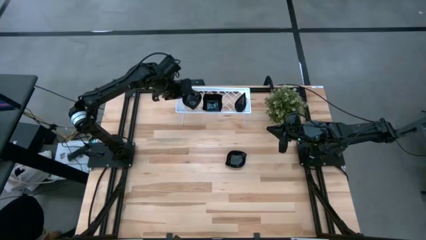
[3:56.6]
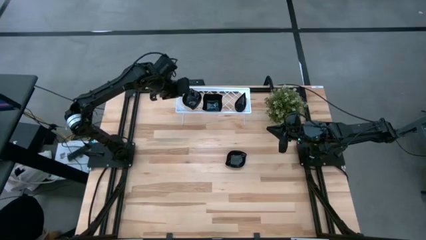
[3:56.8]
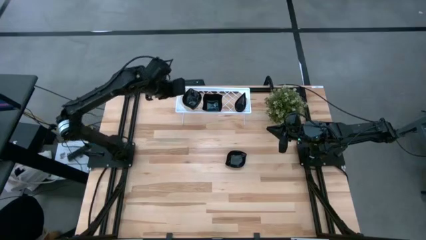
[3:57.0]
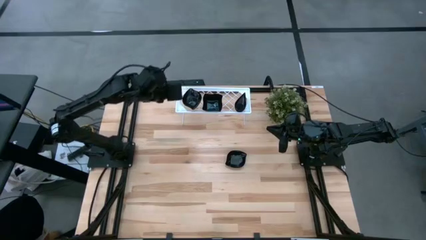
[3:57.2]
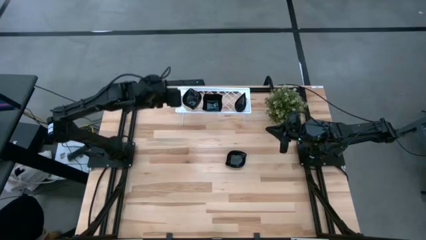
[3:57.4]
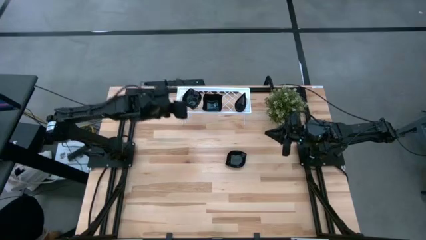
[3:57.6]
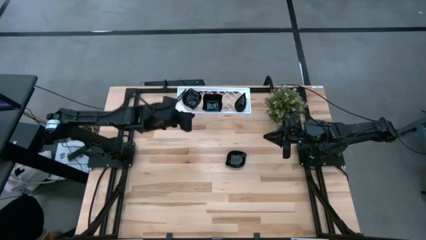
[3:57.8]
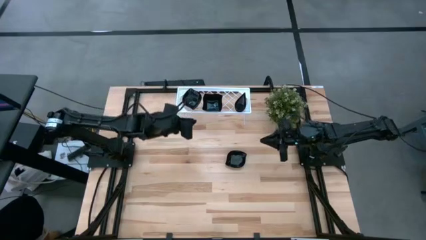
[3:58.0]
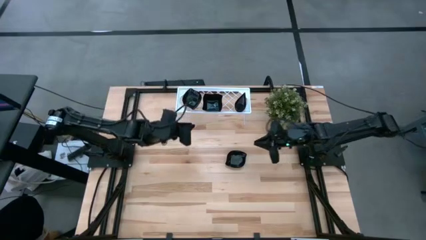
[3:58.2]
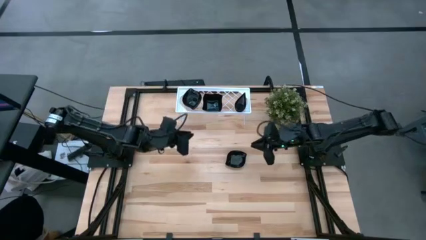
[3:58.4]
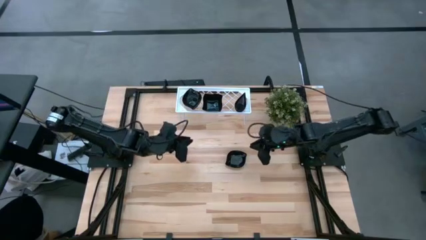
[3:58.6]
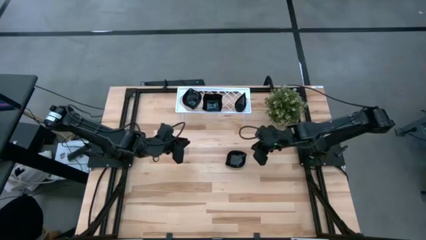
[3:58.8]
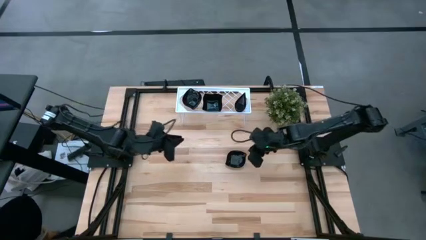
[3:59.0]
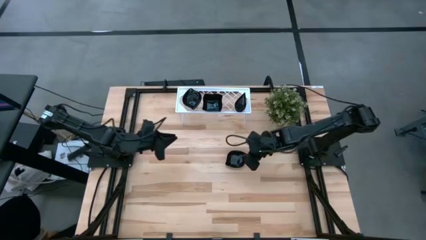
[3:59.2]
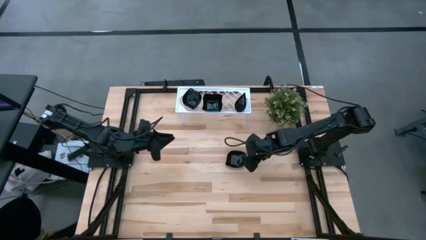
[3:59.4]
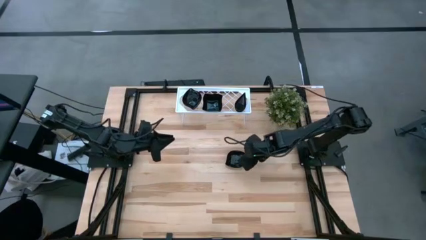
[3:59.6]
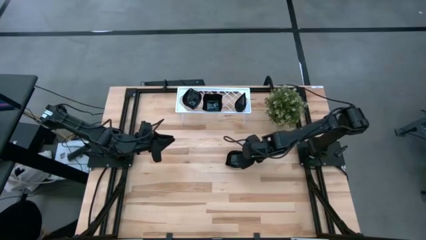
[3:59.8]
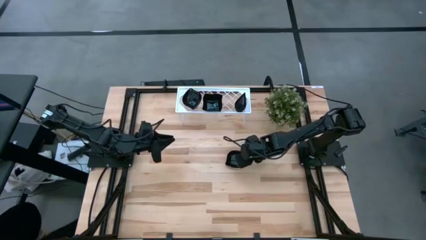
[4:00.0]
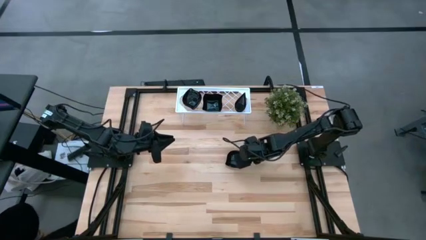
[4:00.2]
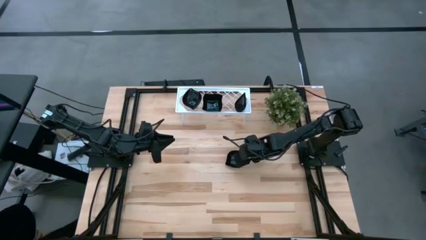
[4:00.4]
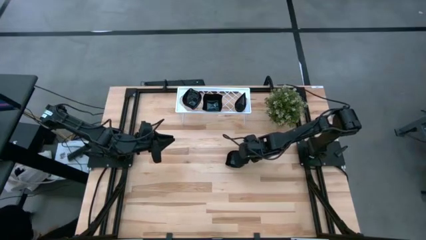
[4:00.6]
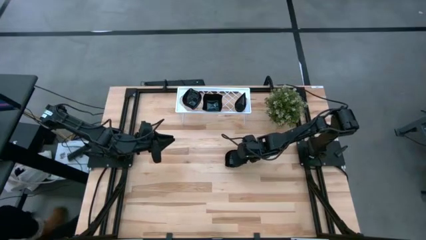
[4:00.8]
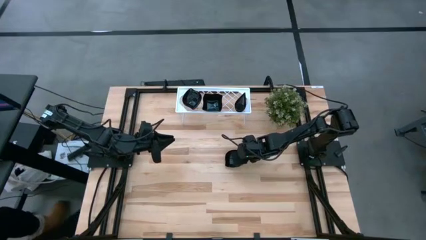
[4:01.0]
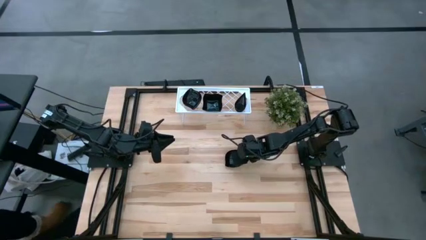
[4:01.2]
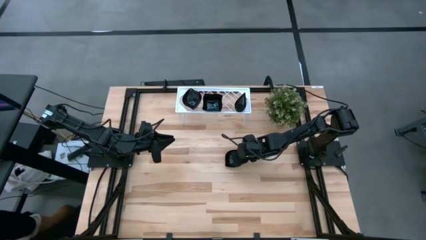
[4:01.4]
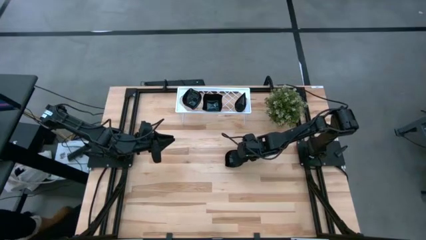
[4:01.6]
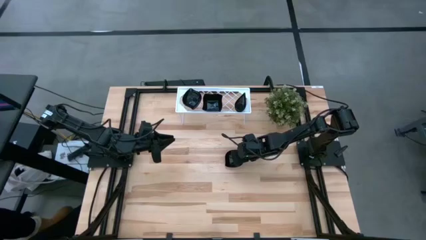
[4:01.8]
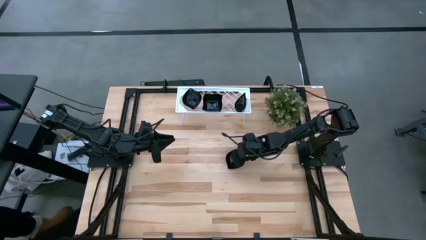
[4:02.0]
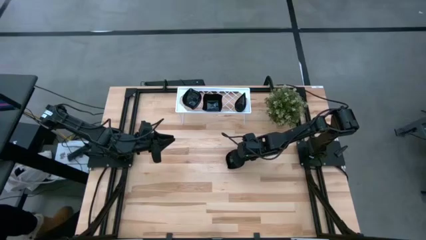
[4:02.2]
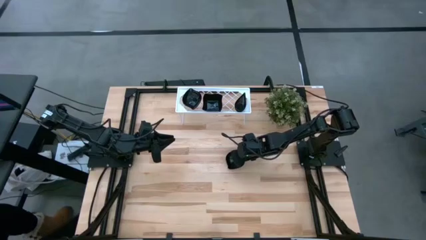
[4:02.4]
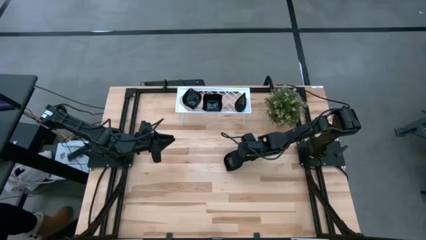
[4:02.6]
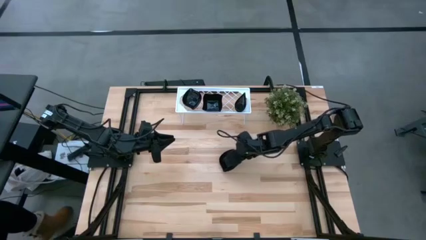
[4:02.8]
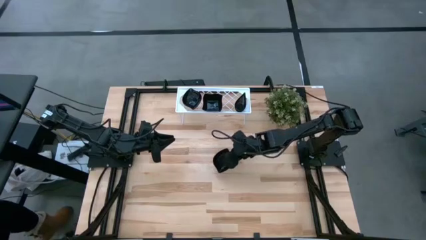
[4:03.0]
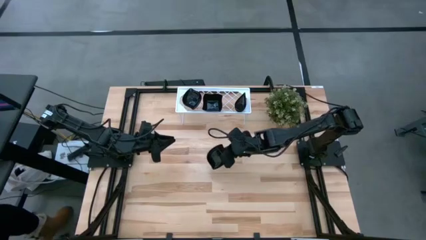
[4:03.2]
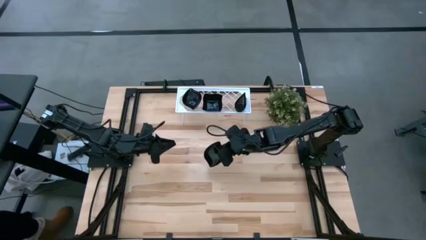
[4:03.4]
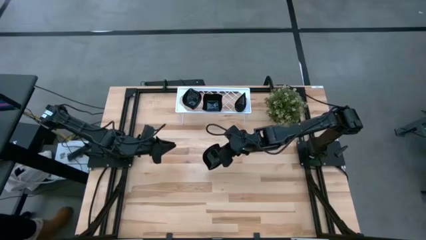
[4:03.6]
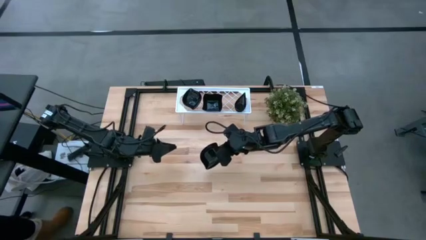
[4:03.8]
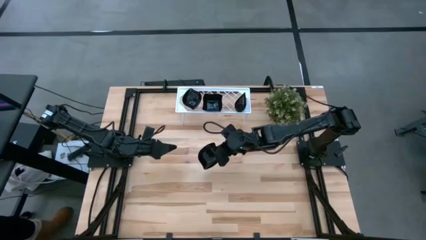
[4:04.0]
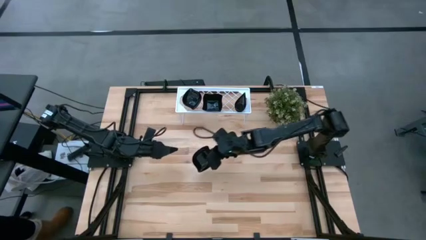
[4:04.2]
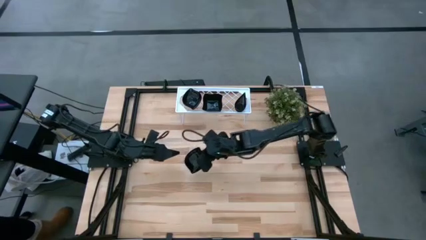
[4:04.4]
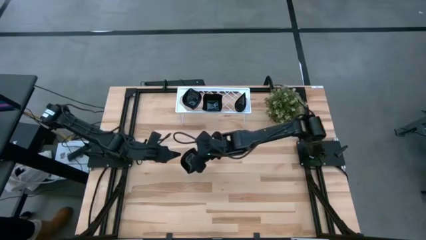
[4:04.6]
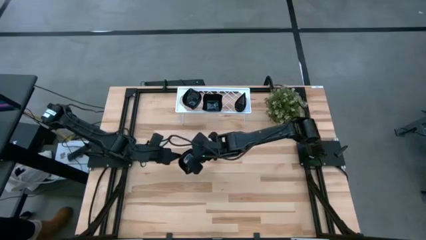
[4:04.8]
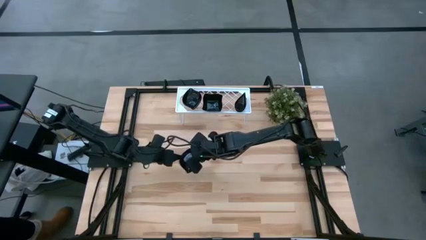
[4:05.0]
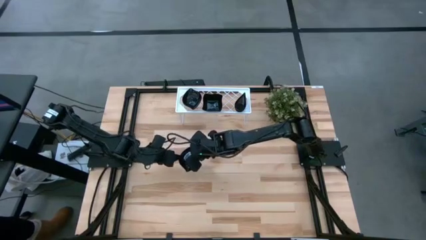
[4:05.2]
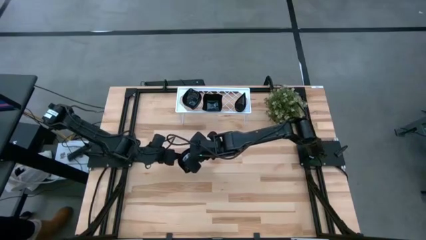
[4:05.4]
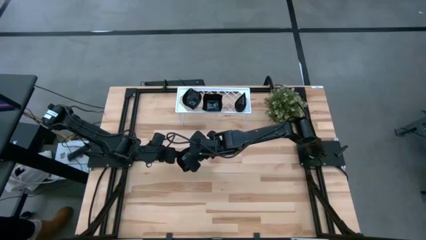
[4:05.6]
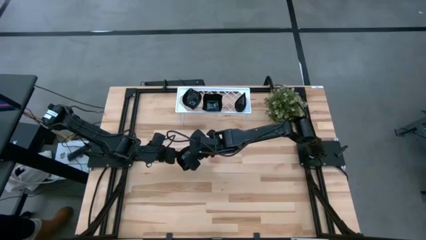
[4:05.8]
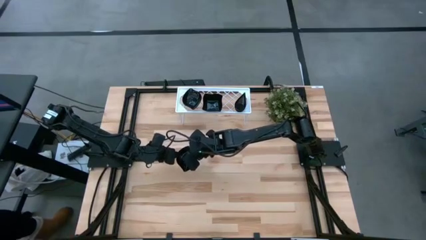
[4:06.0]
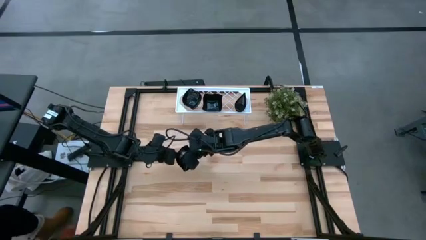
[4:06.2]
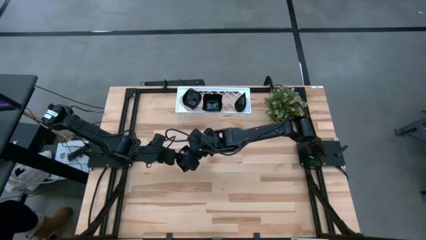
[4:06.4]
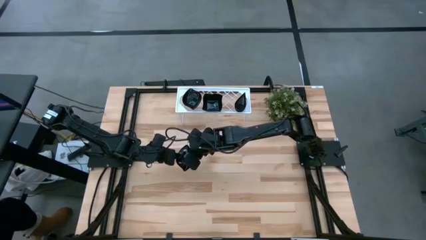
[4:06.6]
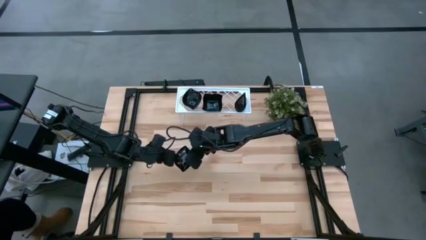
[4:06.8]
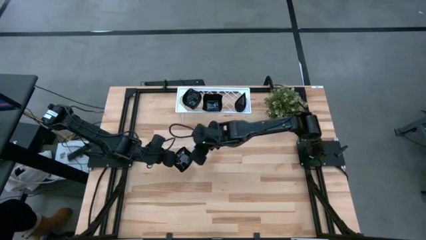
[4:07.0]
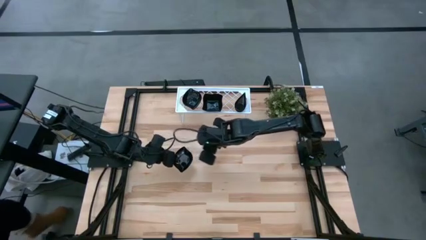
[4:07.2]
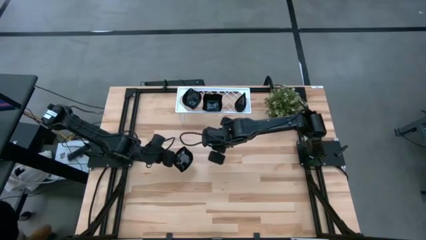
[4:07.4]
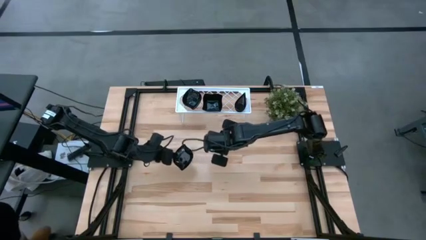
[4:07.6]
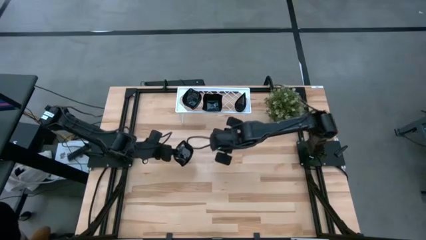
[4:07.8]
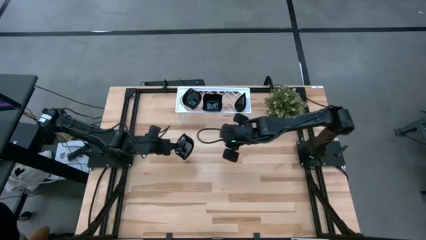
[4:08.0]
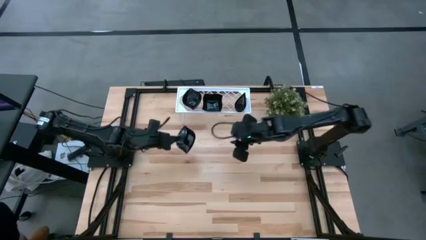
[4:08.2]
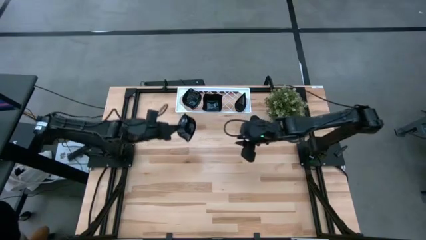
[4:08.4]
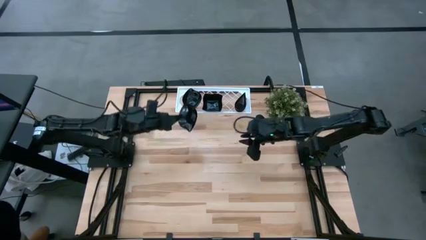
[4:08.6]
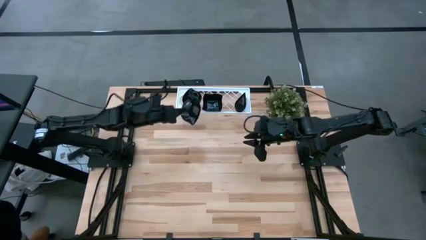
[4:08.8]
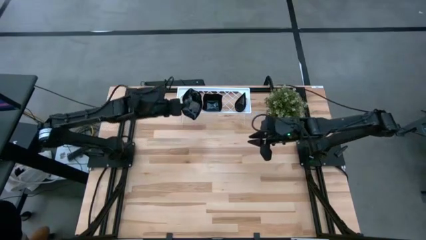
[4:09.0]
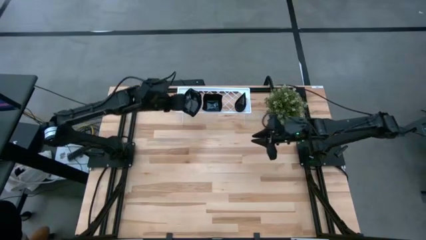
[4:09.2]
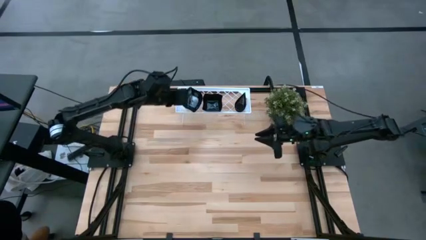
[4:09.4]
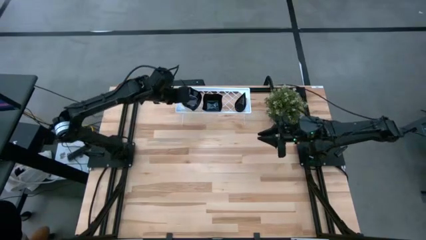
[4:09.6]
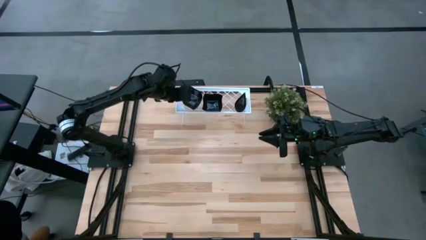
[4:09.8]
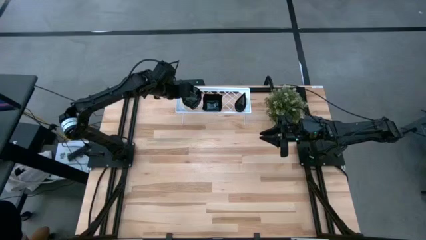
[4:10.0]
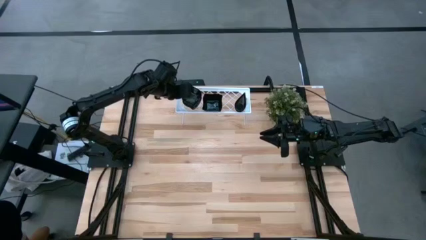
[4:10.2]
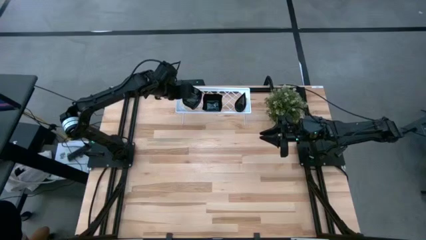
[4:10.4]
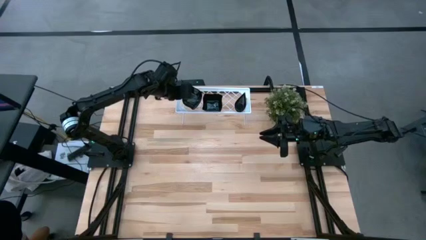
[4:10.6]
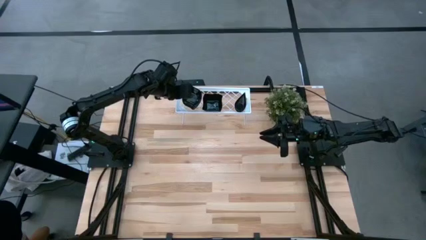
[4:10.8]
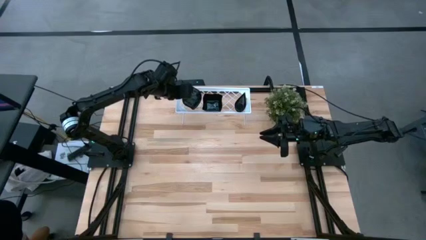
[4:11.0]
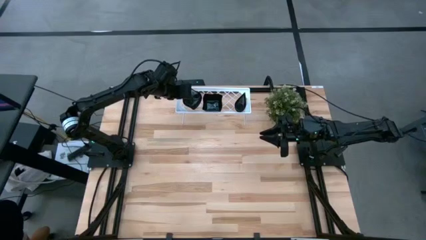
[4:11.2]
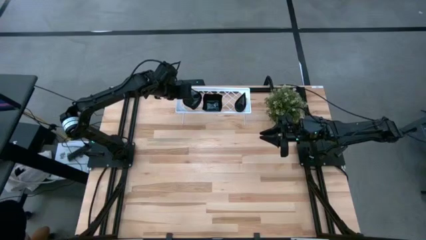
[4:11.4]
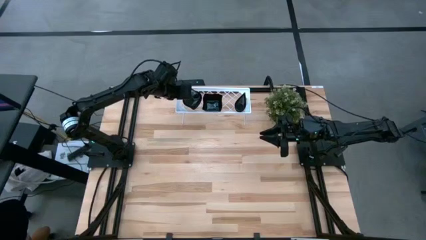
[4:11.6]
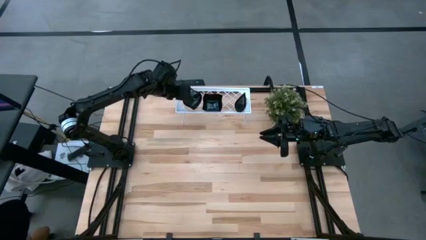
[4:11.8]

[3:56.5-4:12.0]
Task: Pick & Place Mini shaped plates
Stack the leaf-shaped plate on top of the leaf-shaped plate on the shelf
